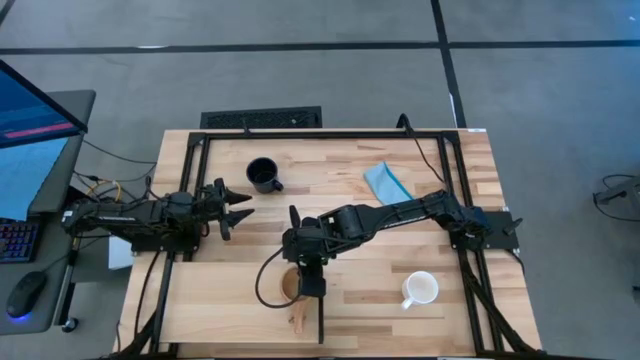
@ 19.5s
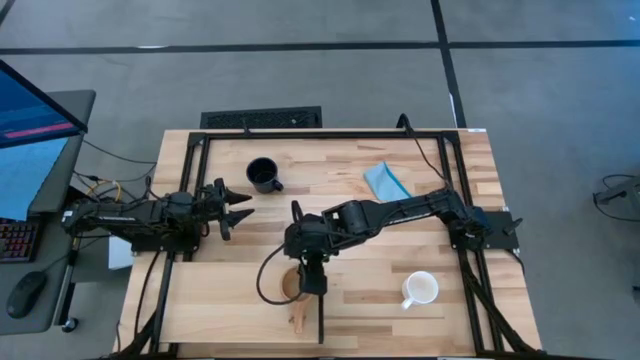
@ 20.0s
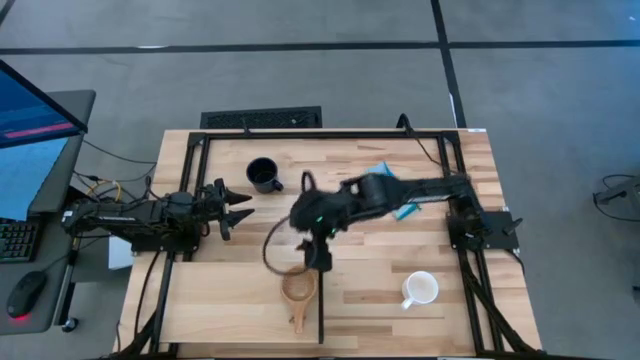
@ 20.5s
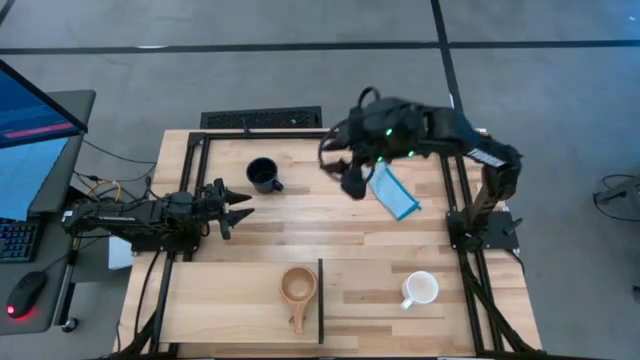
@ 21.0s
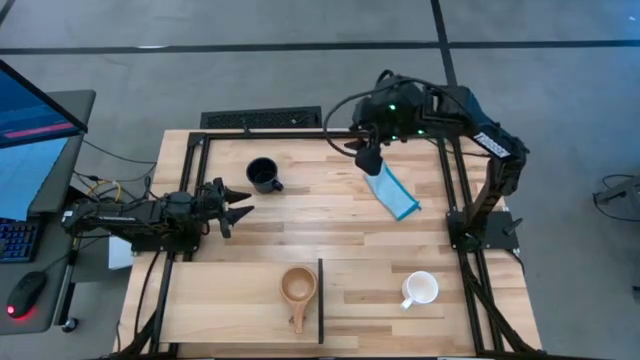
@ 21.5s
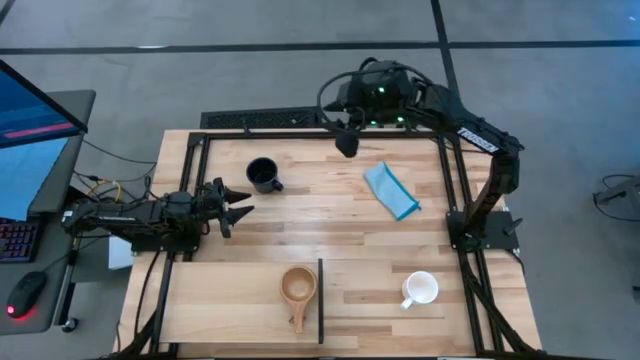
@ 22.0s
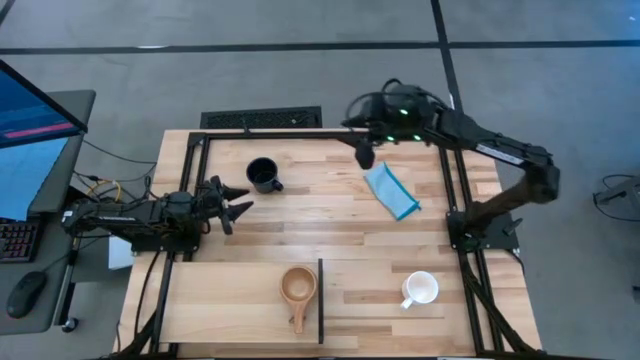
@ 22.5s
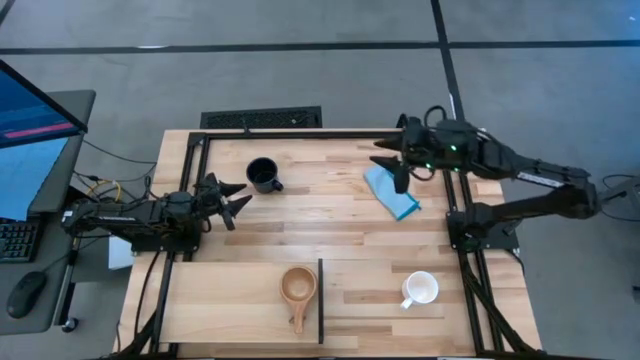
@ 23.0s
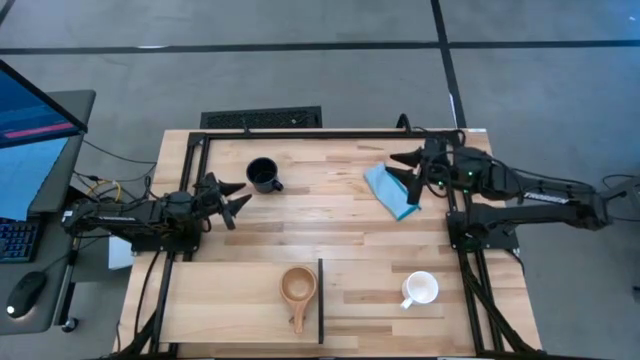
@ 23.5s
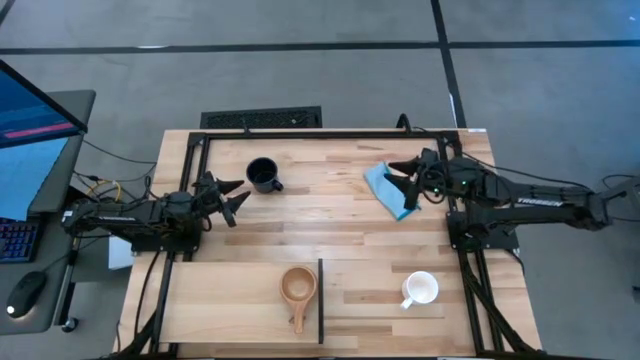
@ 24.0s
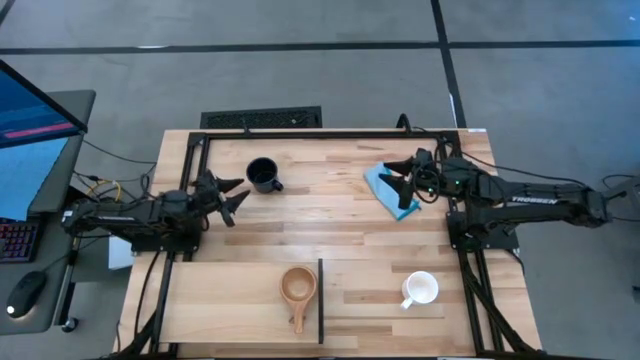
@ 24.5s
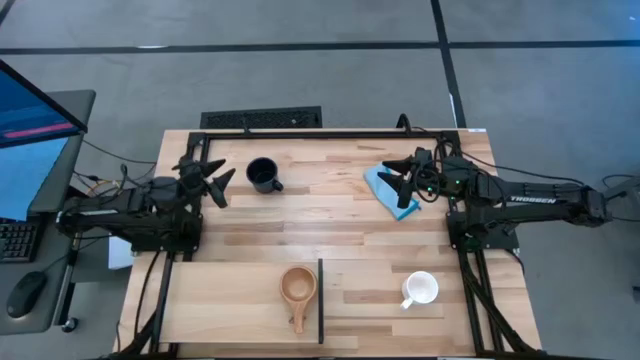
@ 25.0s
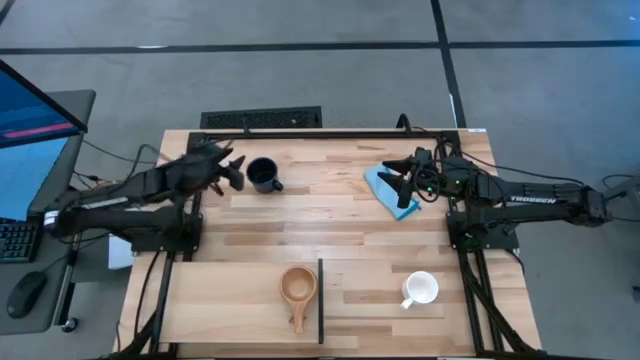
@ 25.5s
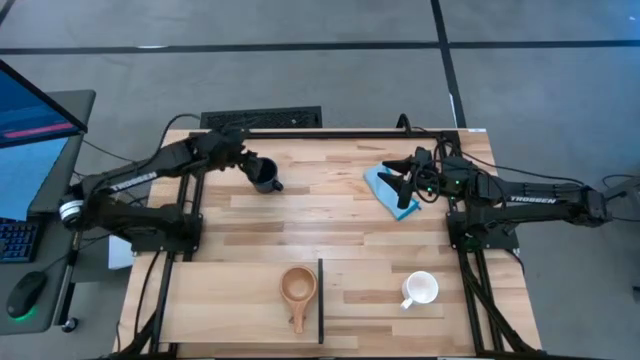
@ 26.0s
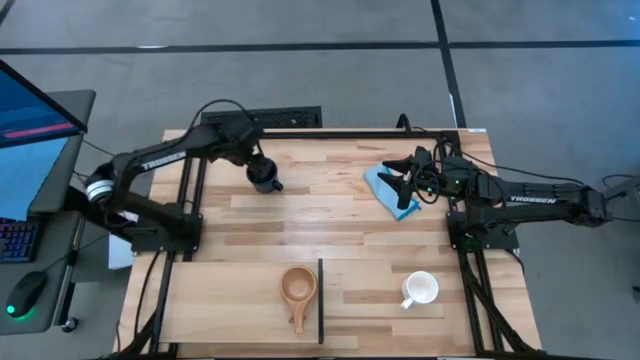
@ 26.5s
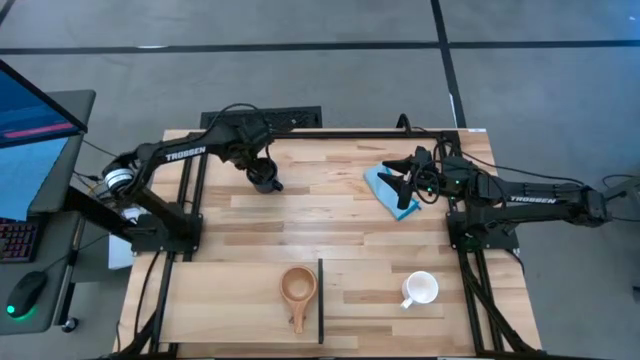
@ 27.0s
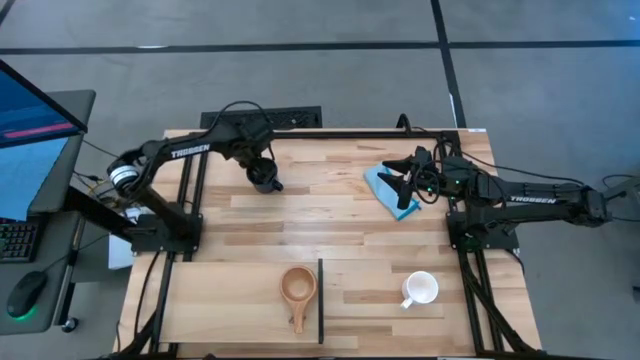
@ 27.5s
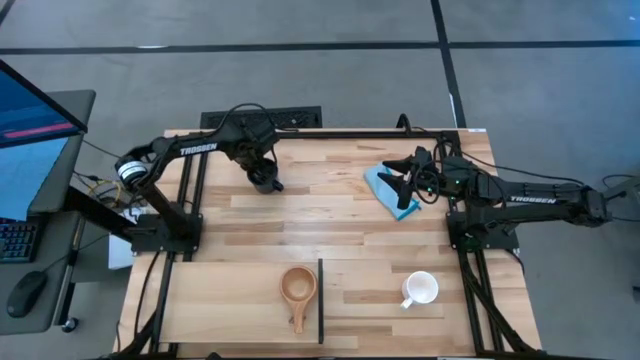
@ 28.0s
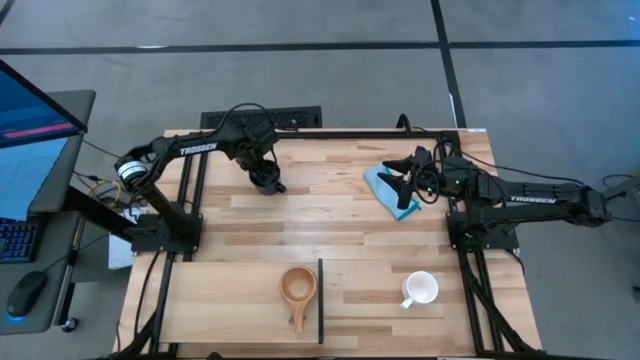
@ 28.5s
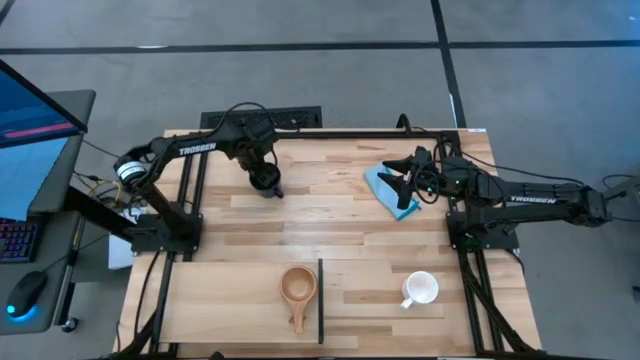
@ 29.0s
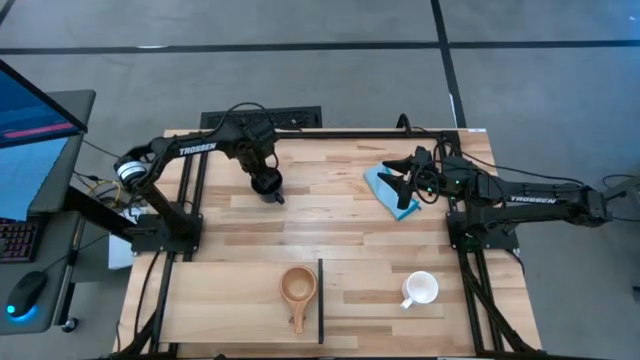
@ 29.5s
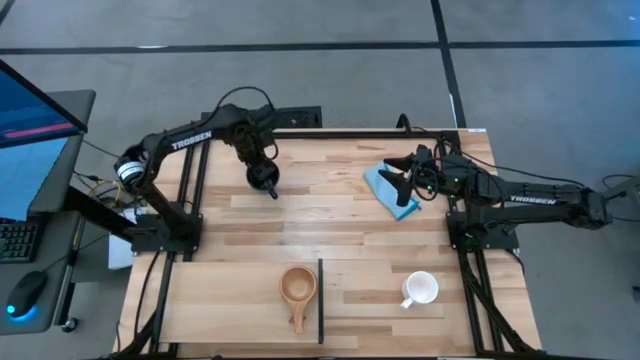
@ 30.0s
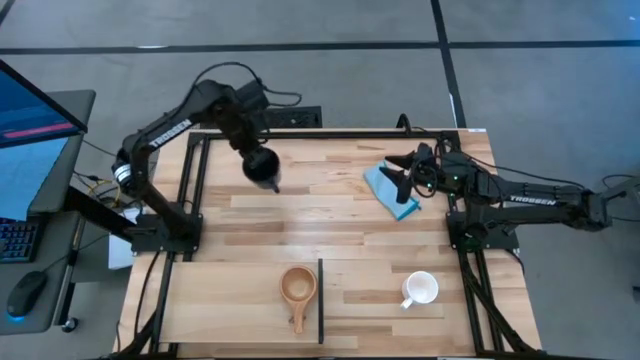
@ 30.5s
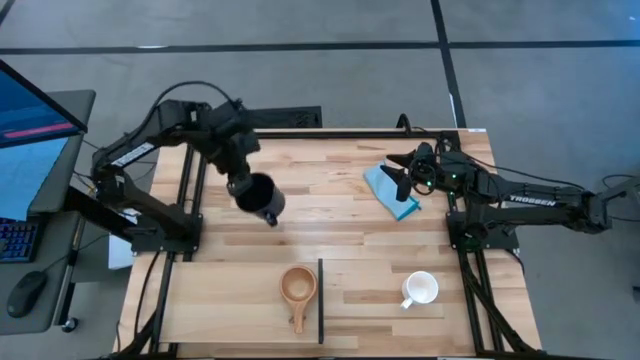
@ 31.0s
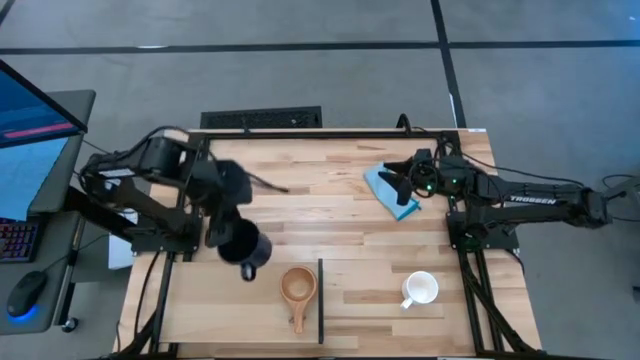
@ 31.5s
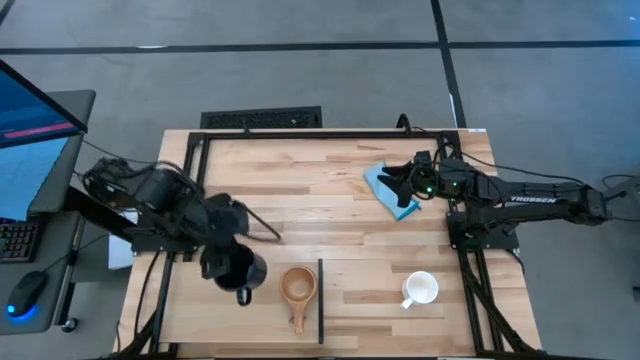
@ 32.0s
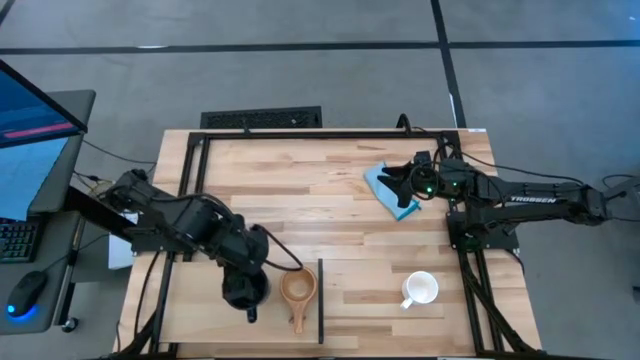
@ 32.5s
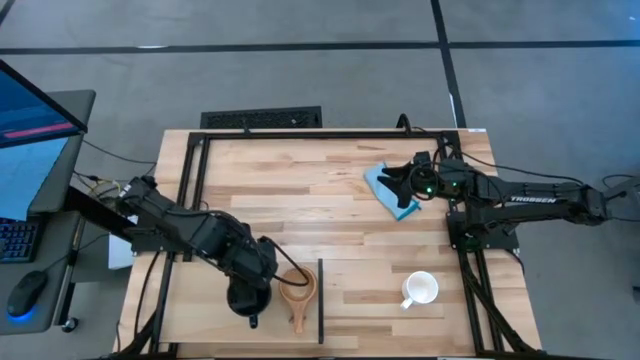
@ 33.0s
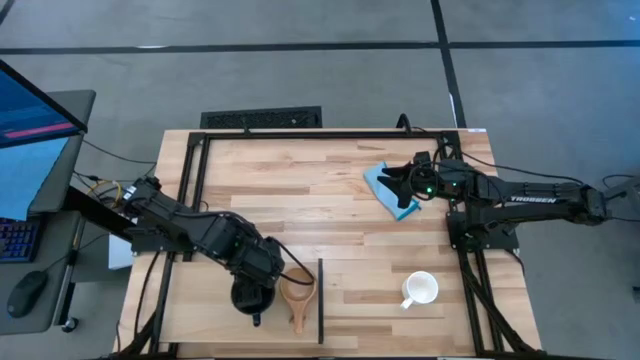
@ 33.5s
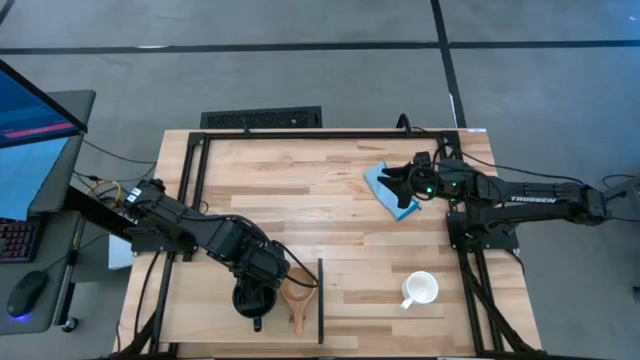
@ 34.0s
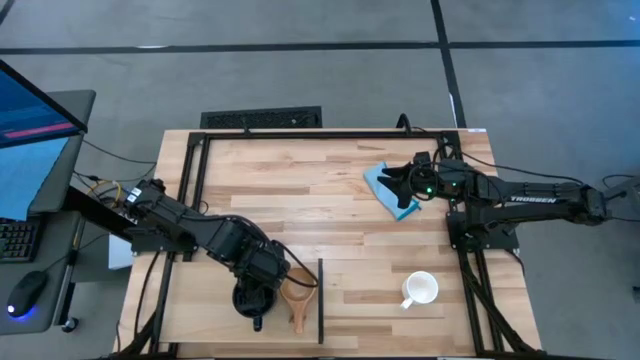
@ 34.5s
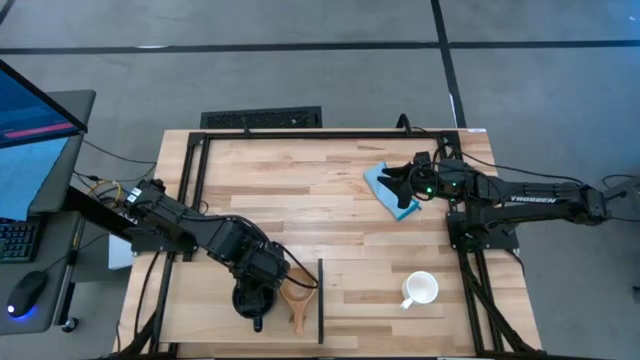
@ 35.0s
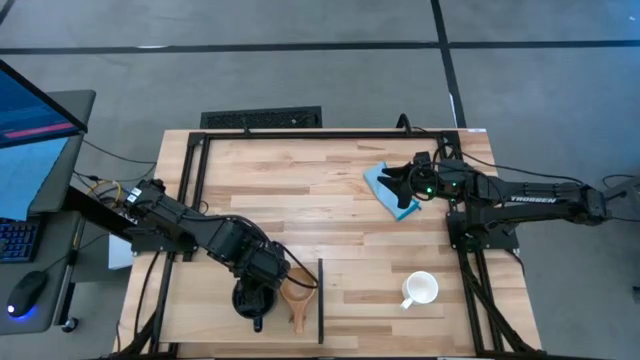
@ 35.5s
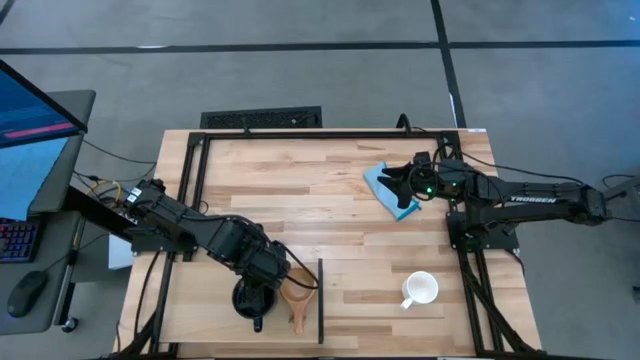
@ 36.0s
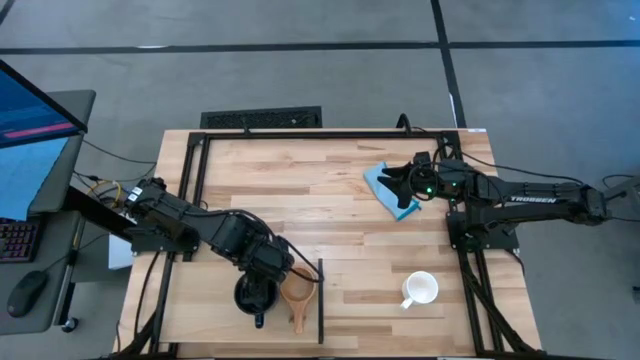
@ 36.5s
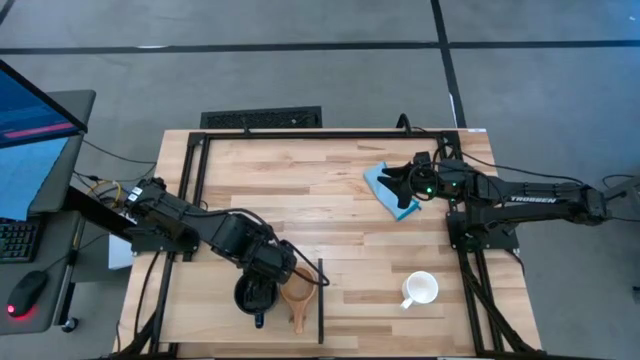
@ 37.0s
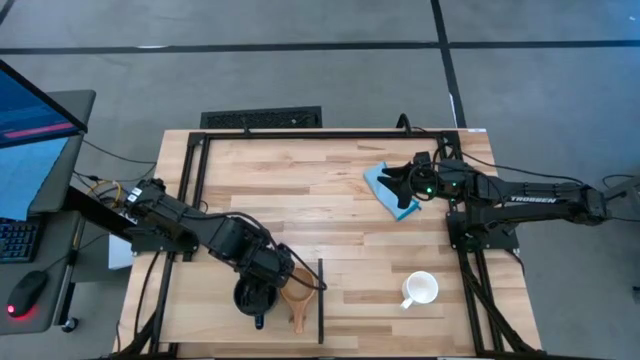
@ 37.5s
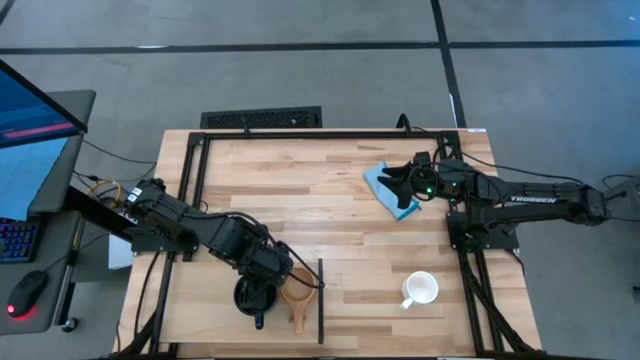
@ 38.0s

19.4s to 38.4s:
Task: Stack small to large cups/mugs on shelf
Put the black mug on the shelf

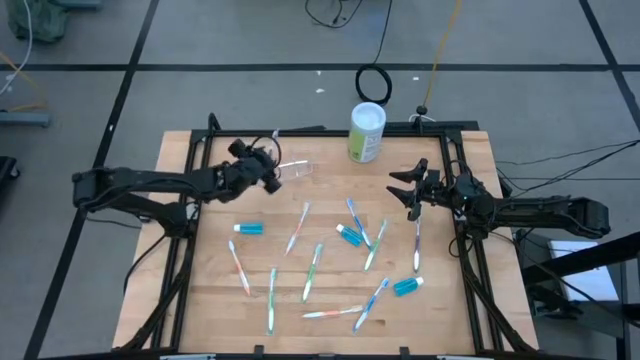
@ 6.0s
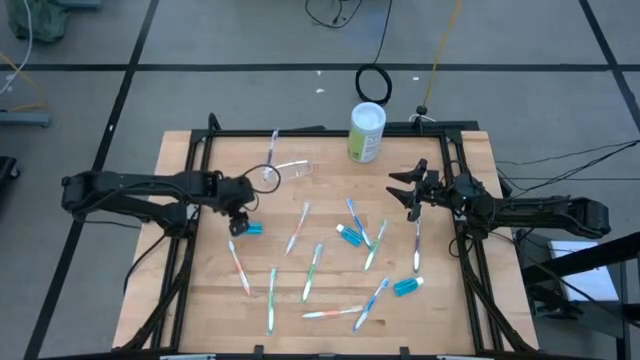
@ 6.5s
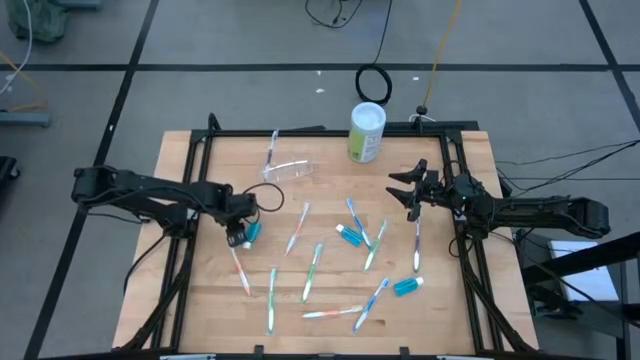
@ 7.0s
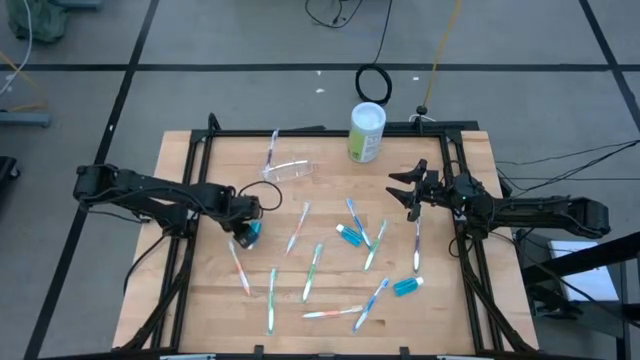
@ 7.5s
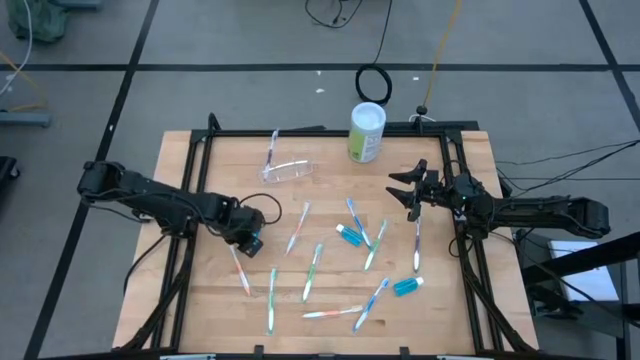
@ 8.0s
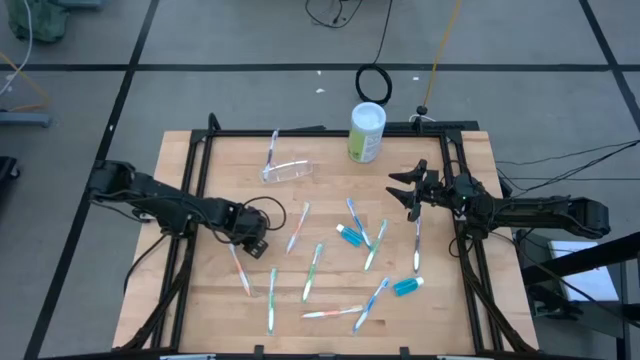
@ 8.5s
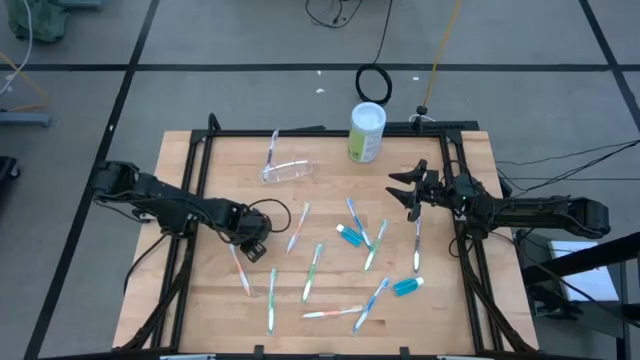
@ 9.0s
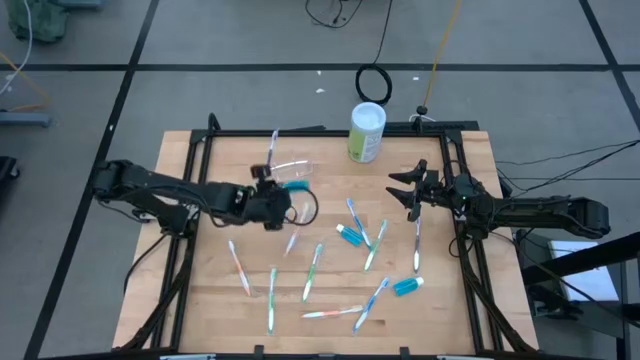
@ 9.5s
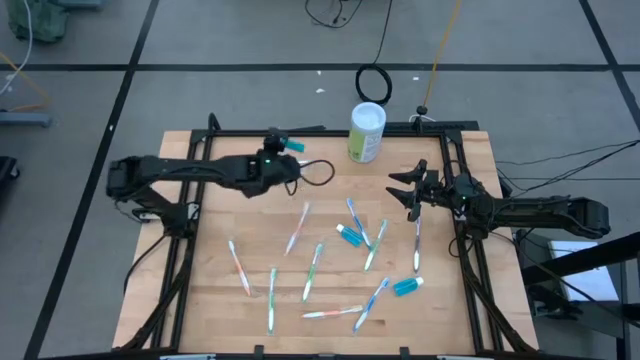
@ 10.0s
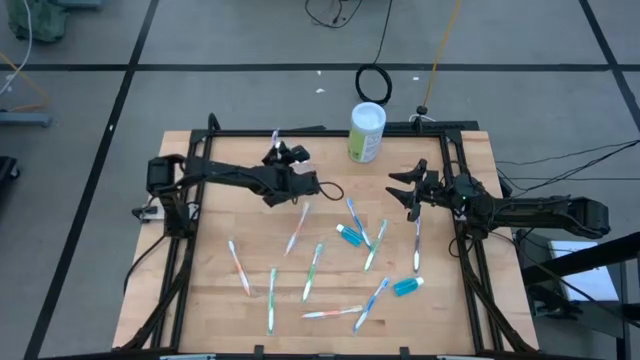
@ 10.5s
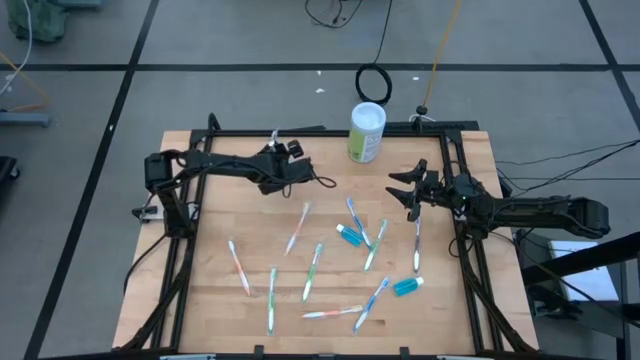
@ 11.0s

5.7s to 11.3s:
Task: Pick & Place toothbrushing station
Put the top left blue mouthwash into the transparent organizer
